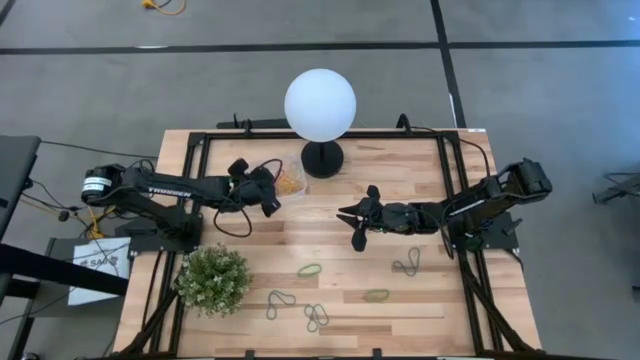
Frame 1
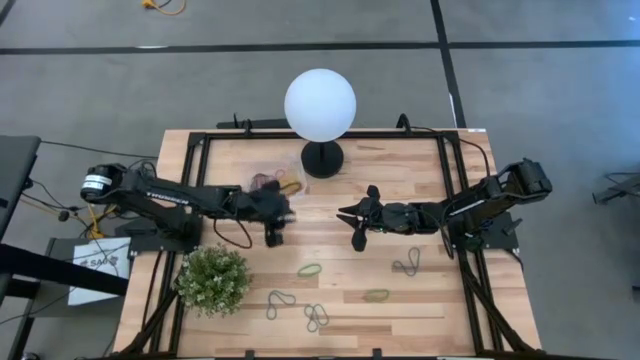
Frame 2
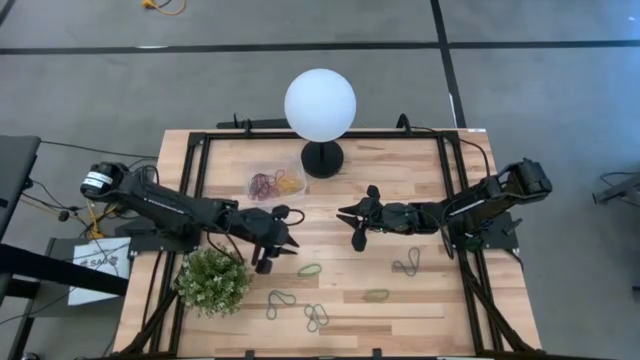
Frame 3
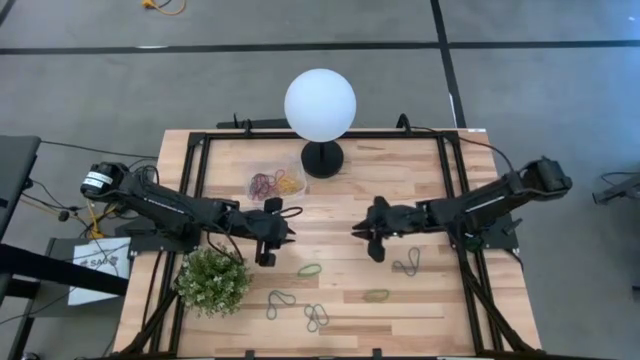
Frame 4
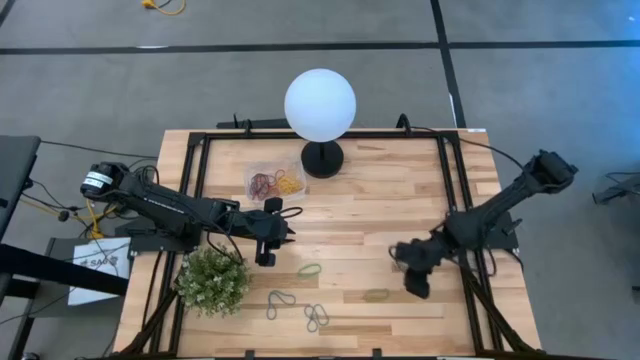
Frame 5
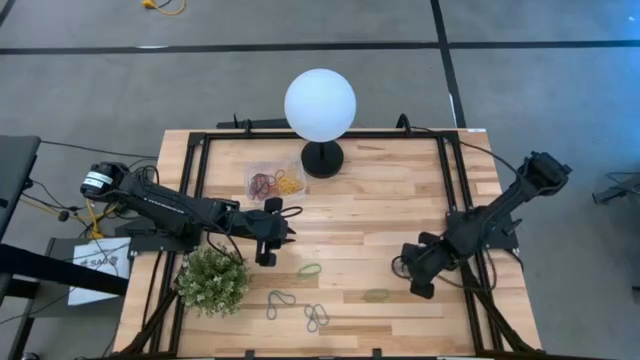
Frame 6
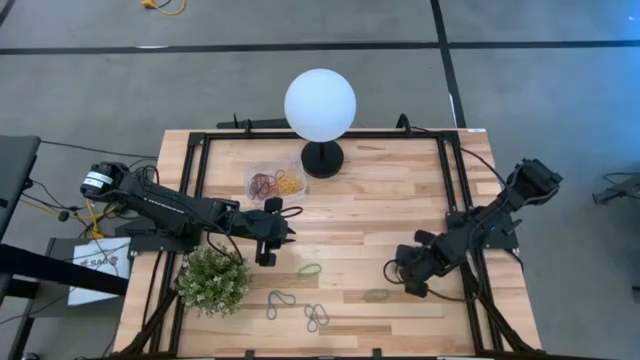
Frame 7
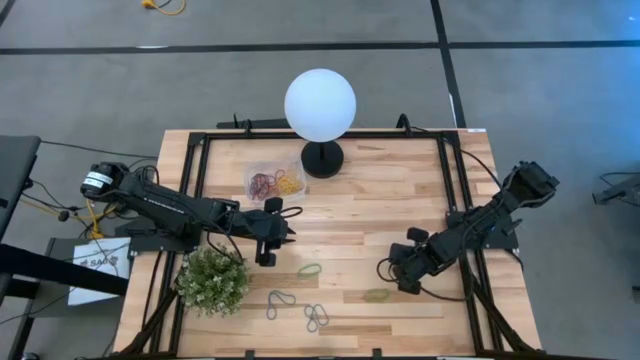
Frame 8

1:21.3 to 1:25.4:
Task: Pick and place items into bin
Put the blue rubber band into the transparent bin

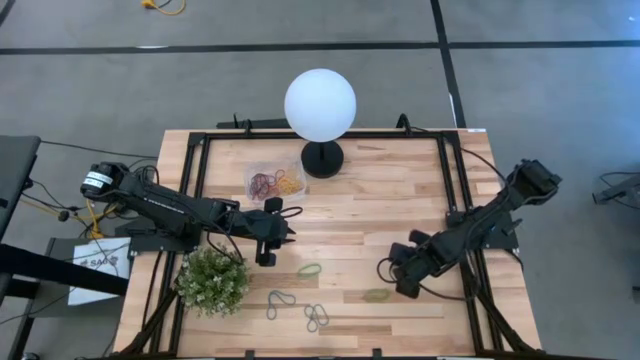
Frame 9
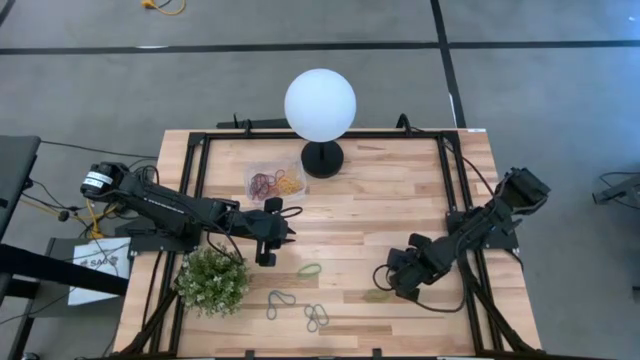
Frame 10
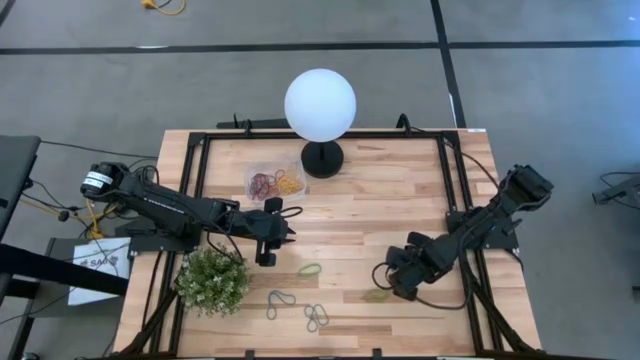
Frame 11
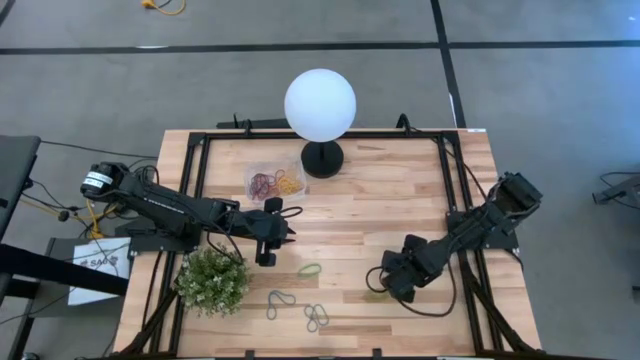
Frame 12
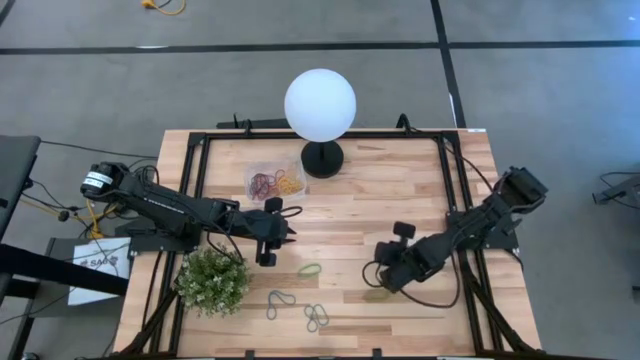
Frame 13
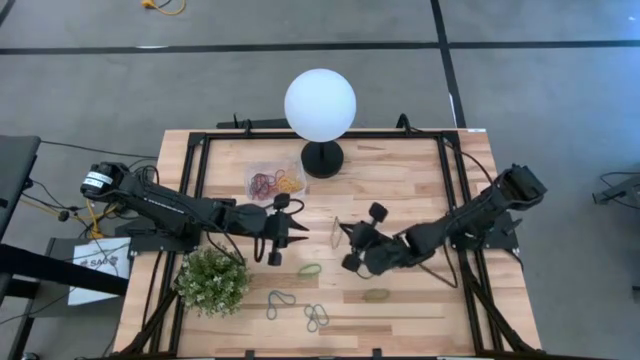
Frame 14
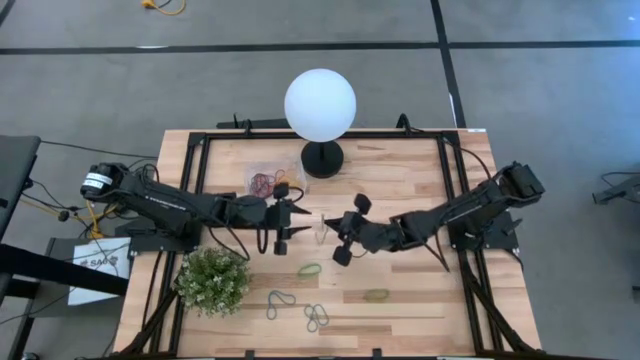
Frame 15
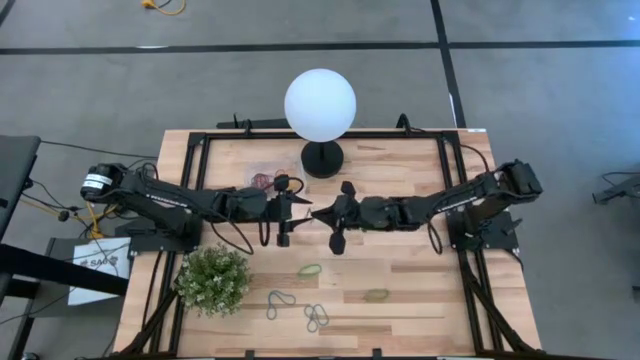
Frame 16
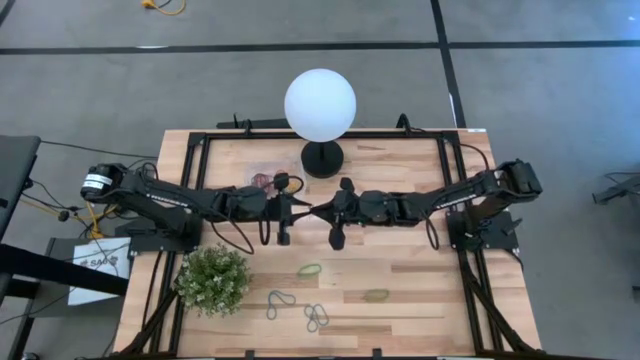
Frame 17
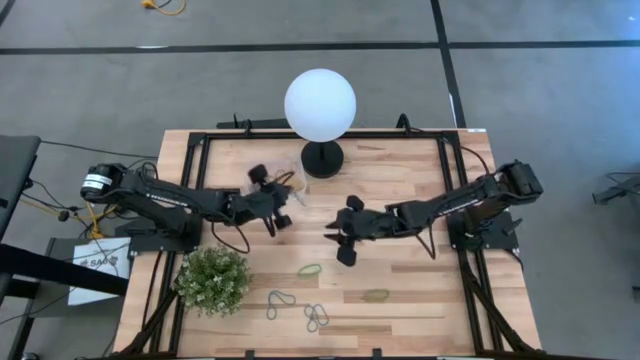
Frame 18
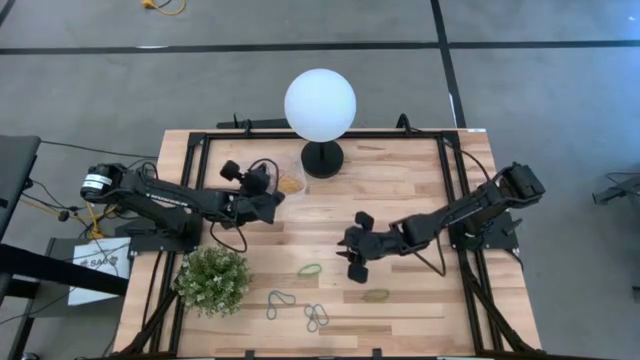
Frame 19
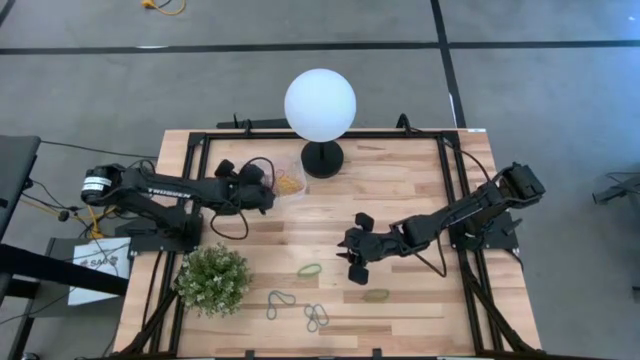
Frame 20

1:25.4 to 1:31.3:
Put the blue rubber band into the transparent bin

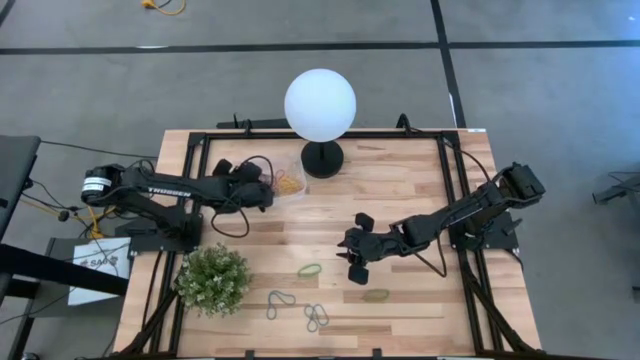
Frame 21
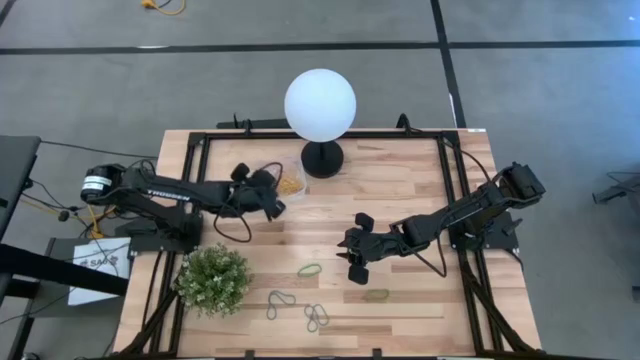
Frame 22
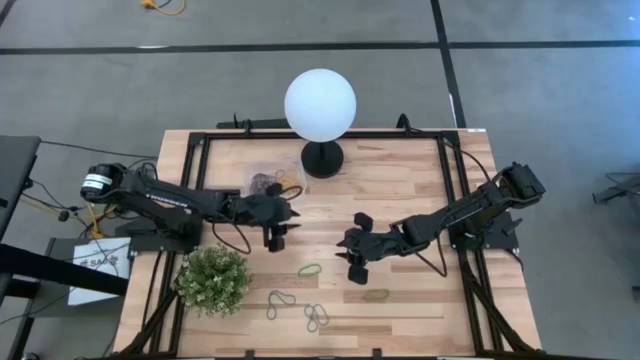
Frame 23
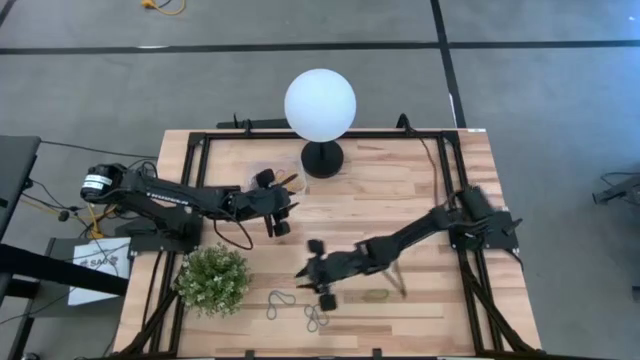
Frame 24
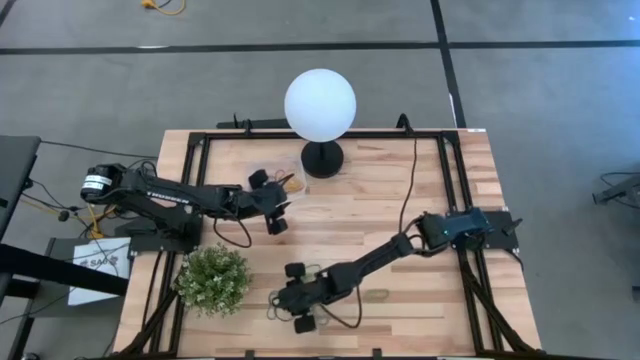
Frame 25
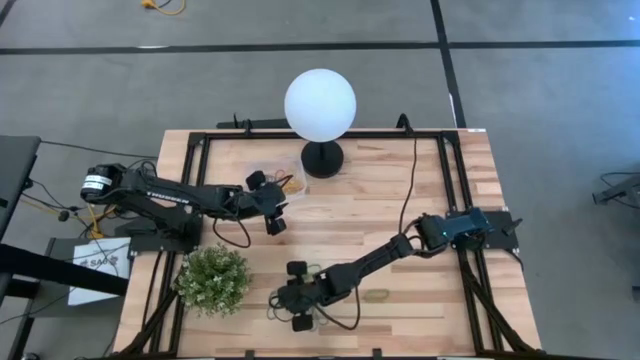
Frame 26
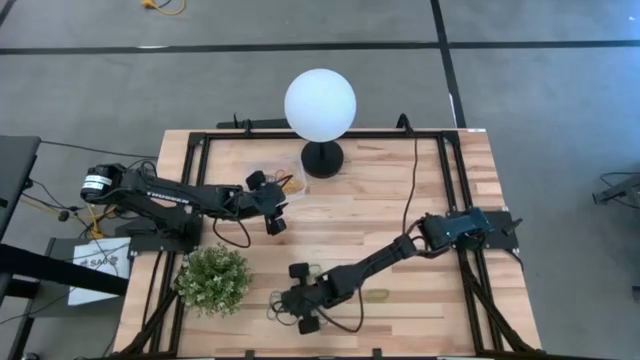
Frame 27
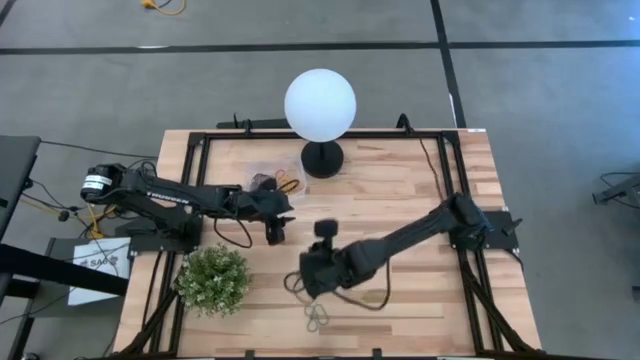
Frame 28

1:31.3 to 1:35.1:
Put the blue rubber band into the transparent bin

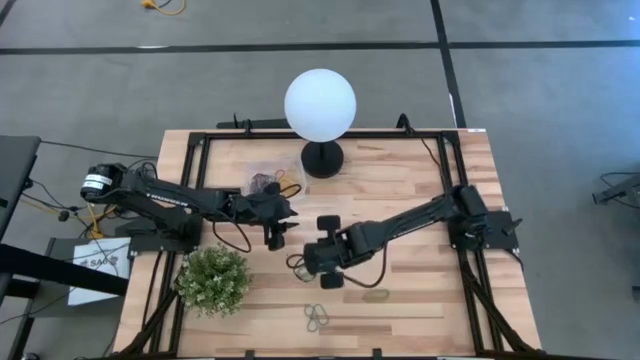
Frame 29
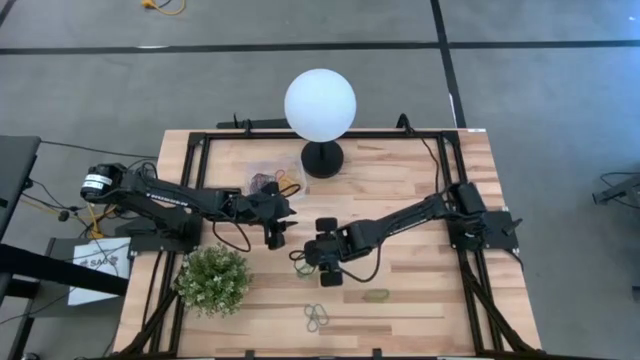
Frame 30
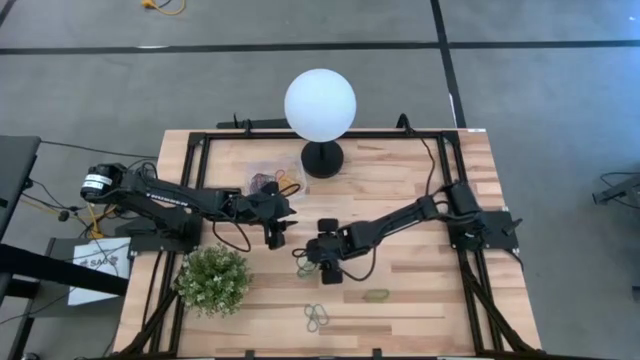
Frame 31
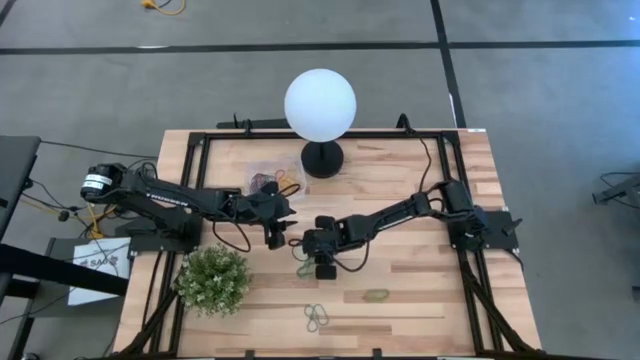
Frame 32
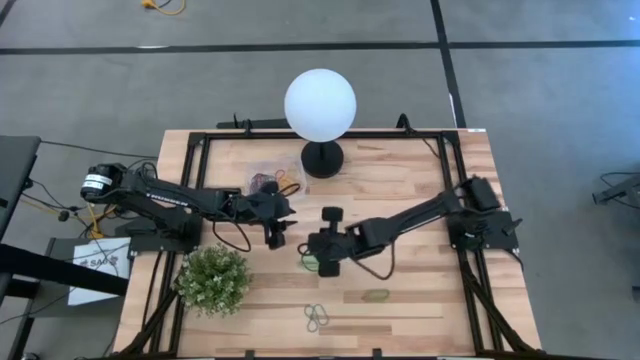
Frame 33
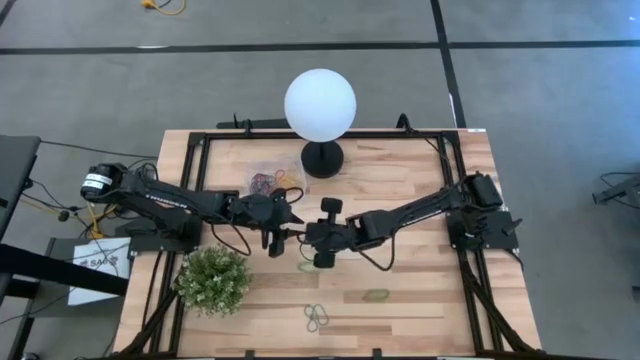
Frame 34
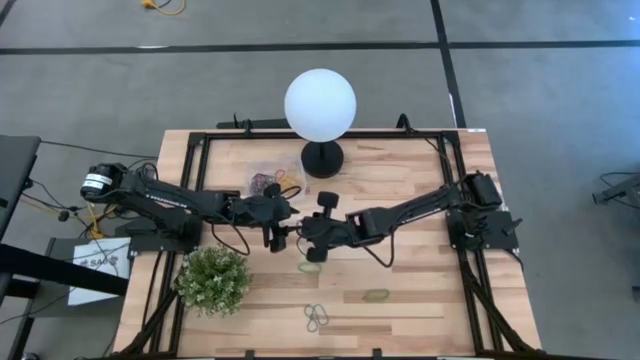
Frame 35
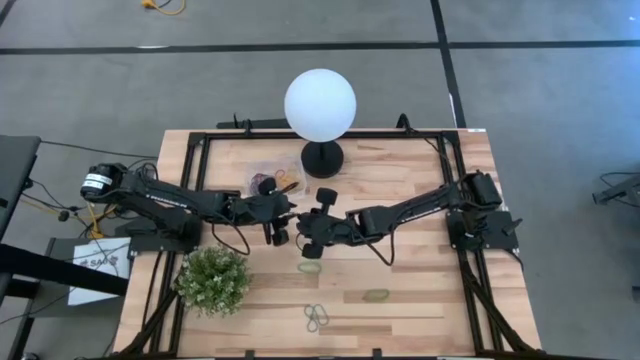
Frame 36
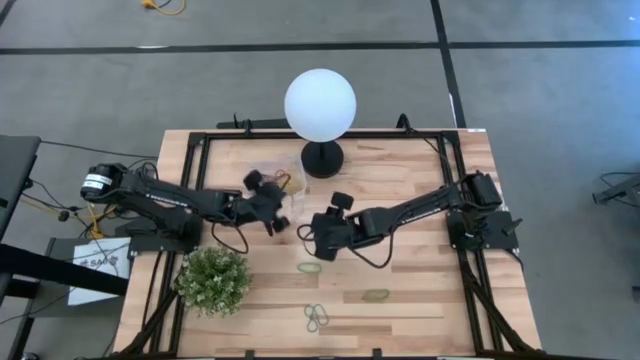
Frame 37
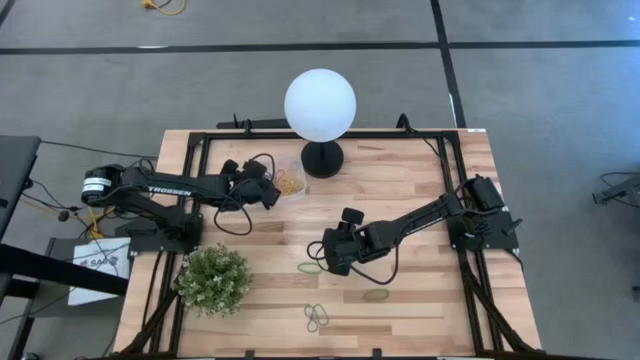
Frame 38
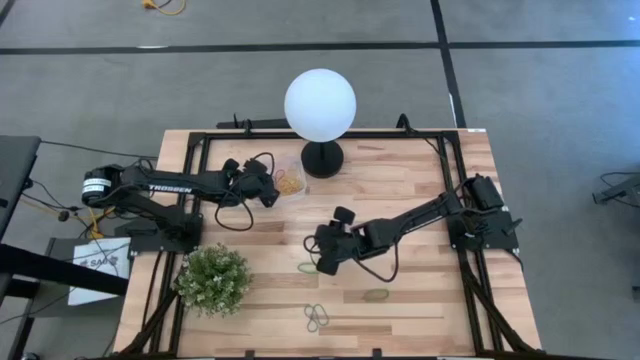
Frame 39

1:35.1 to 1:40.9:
Put the blue rubber band into the transparent bin

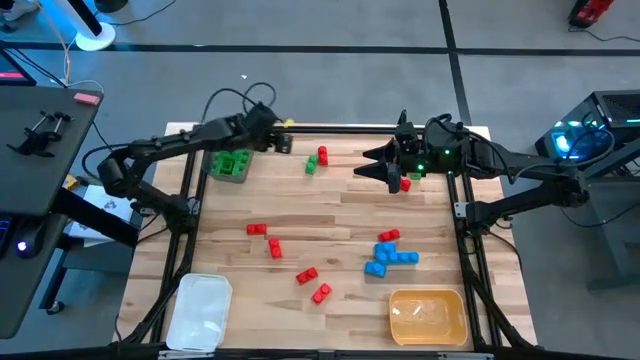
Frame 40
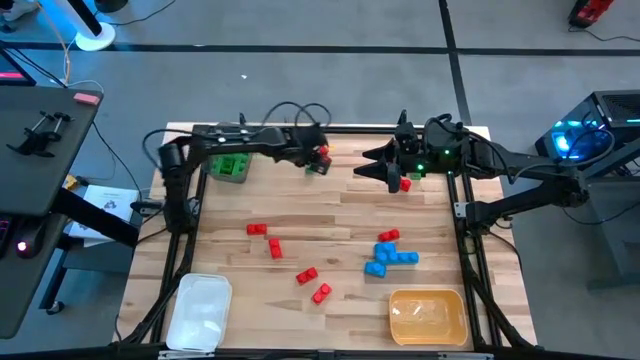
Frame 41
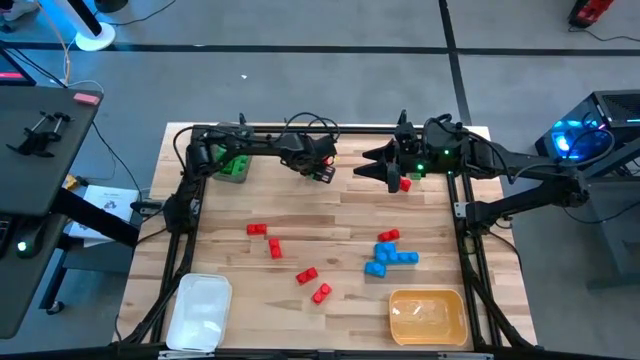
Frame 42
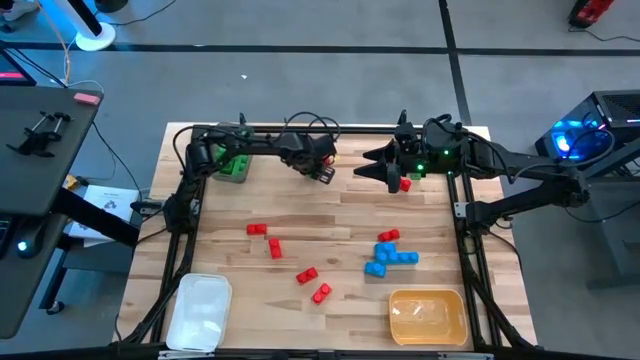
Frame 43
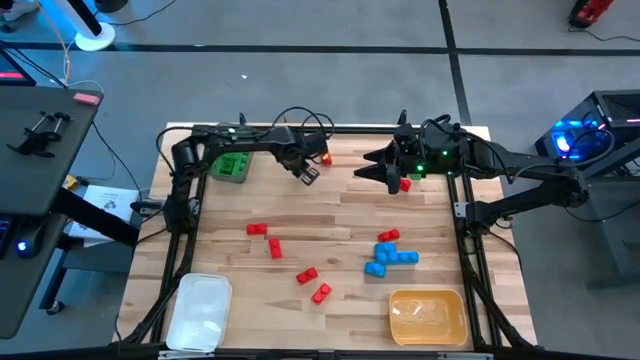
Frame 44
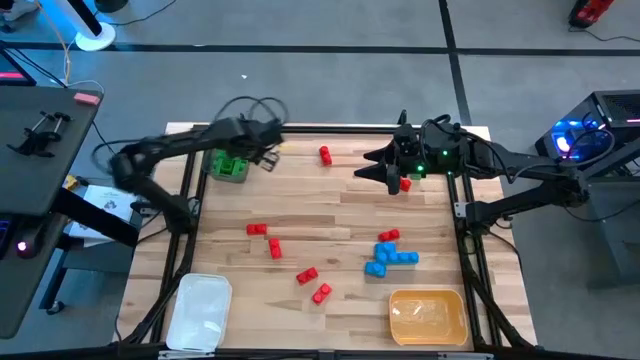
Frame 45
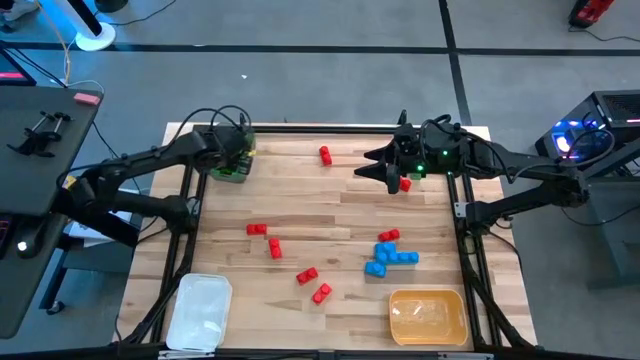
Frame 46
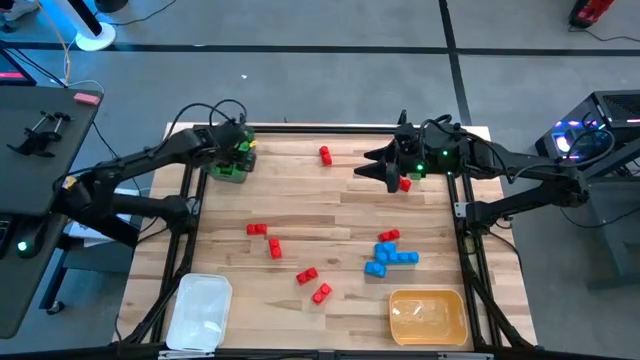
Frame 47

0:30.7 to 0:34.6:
Task: Sort blocks
Put the green game piece into the black bin
